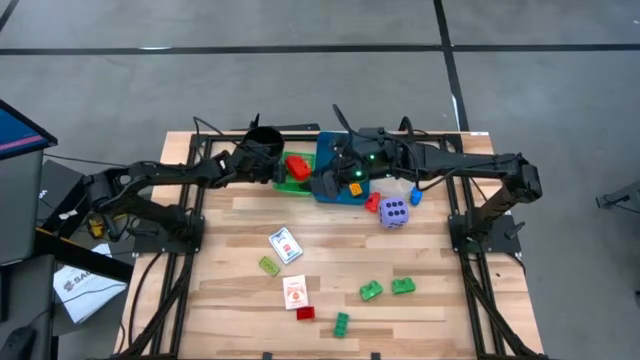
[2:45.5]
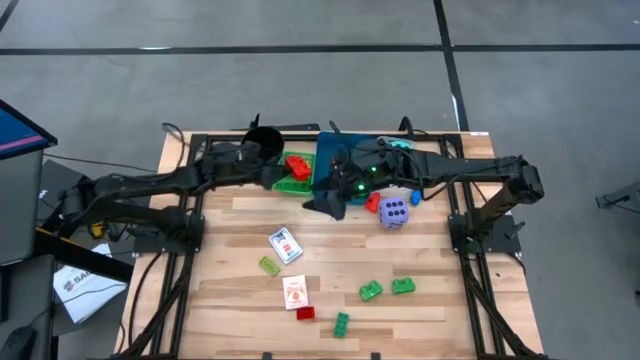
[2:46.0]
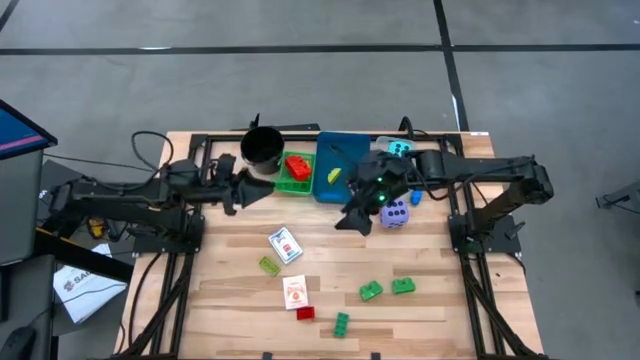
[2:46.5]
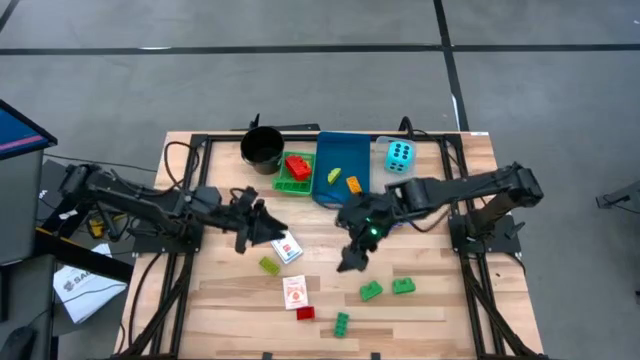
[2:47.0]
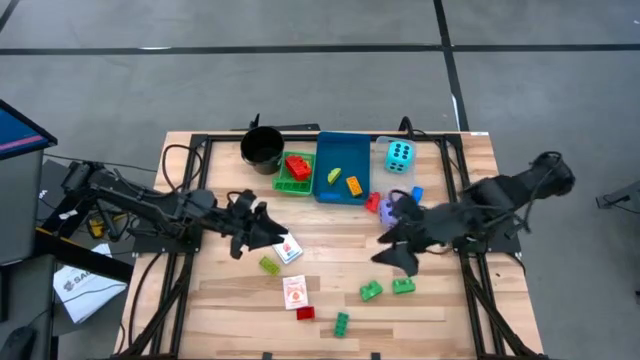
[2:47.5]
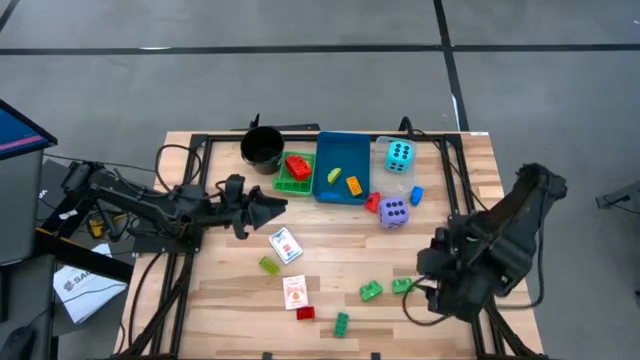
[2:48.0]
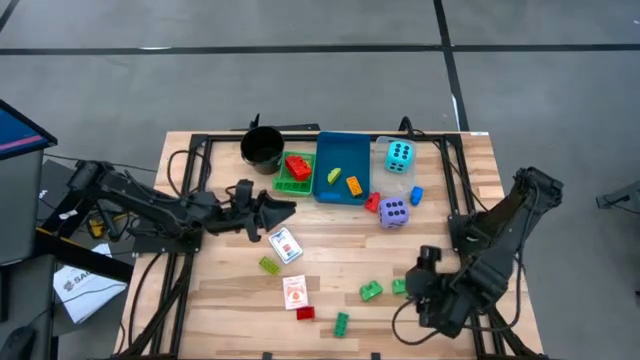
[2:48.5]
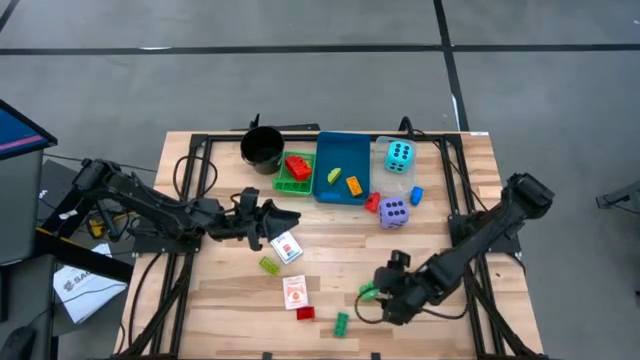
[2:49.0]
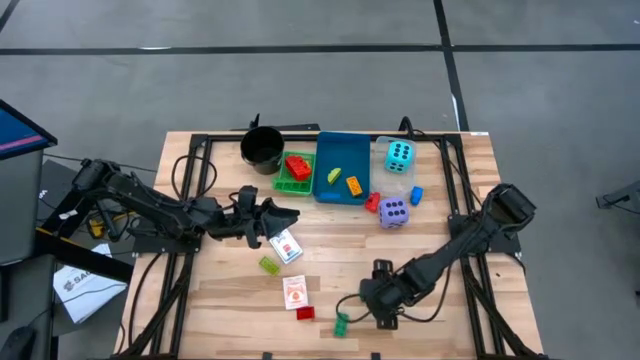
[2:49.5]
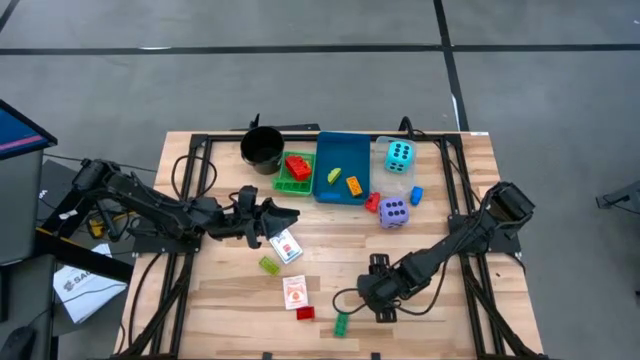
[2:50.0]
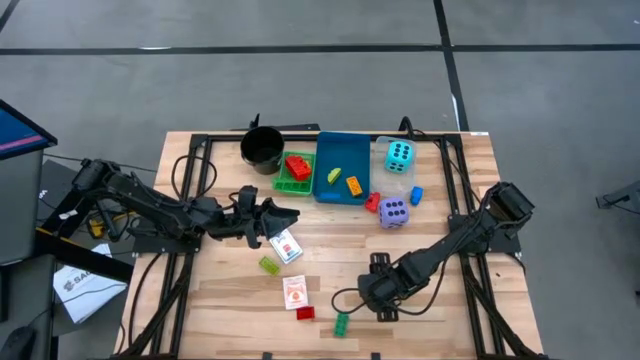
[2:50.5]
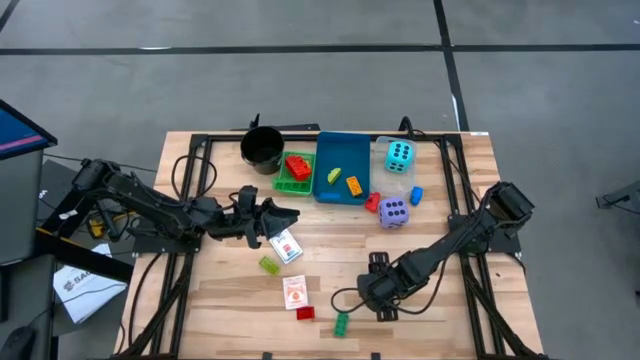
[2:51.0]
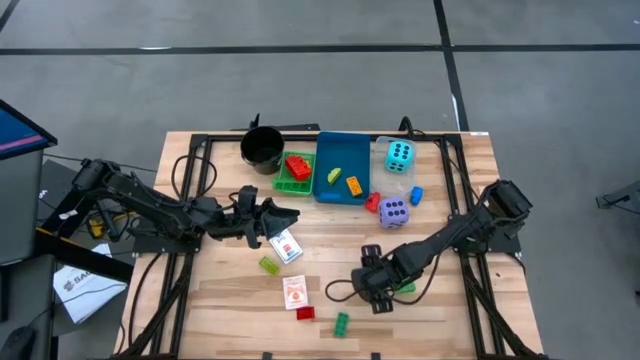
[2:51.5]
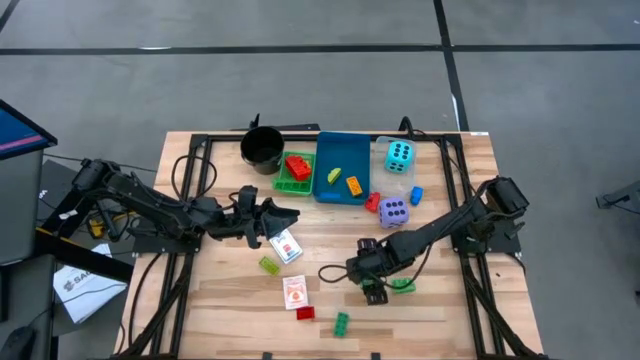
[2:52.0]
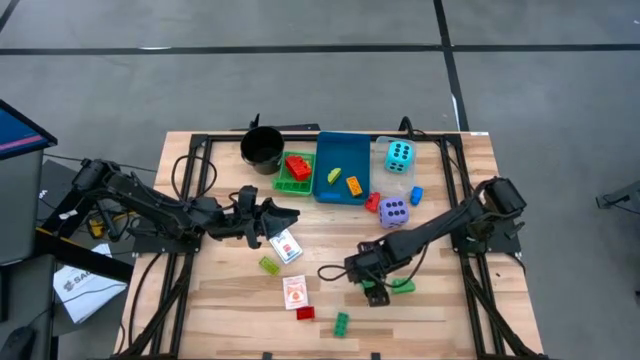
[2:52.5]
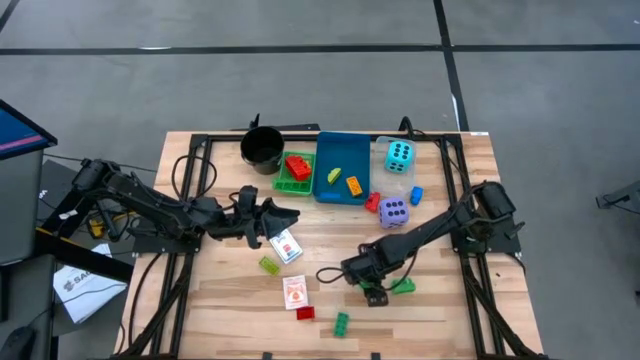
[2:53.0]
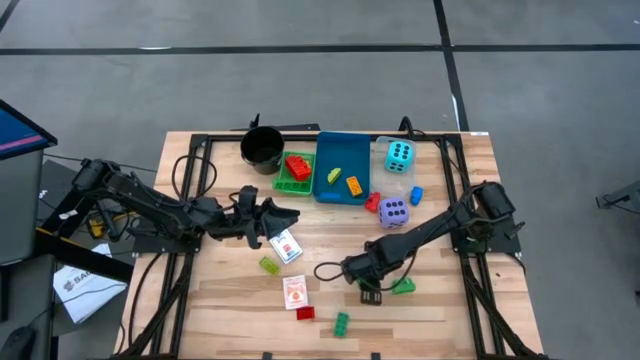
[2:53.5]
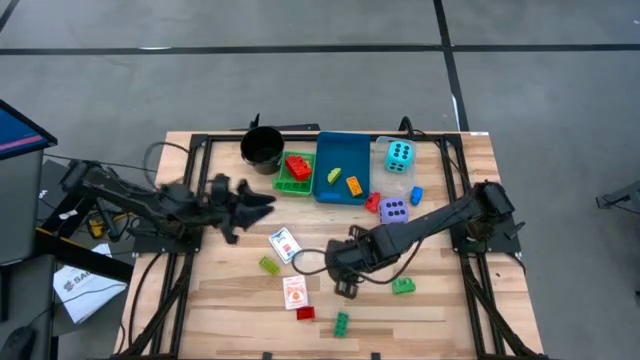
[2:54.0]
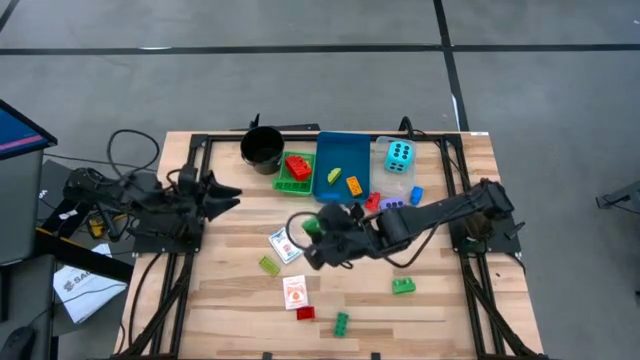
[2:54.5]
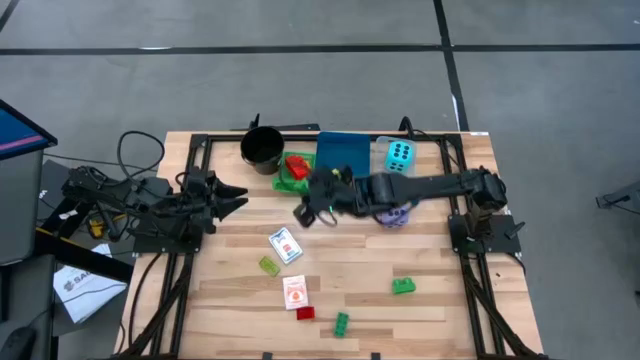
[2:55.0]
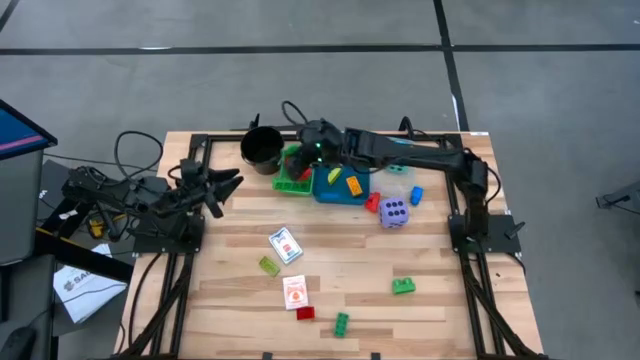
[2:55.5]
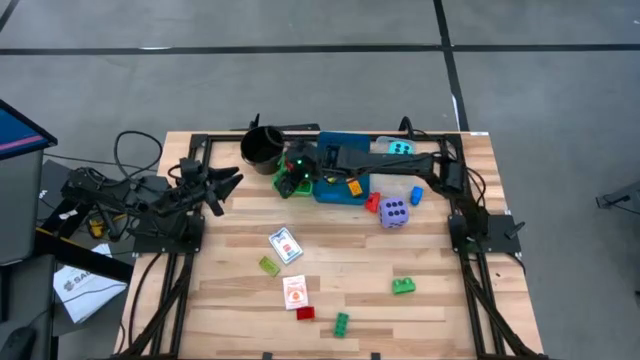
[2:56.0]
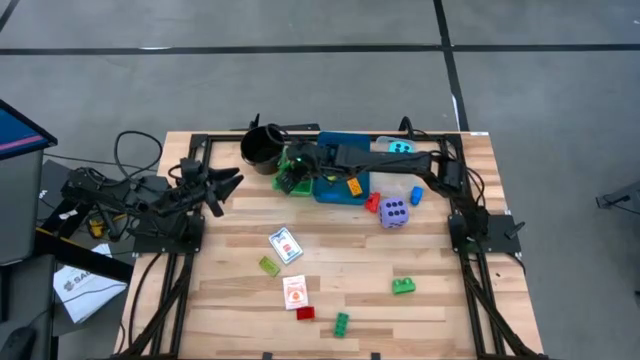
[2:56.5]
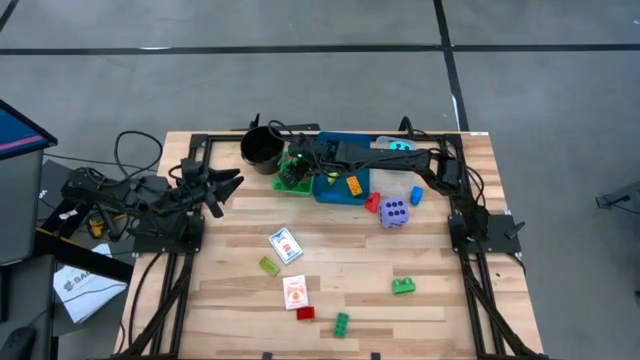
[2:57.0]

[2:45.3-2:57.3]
Task: Pick & Place Toys
Put the large stud green game piece into the green bin
